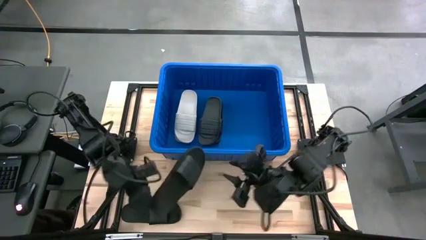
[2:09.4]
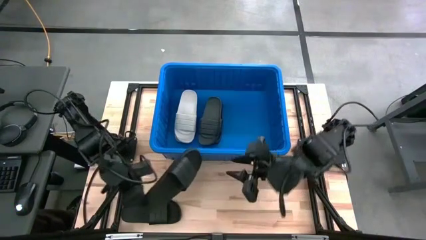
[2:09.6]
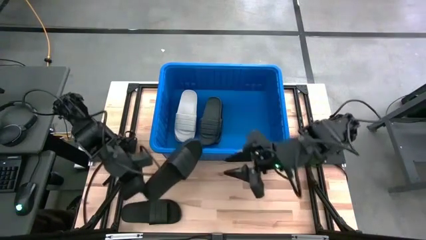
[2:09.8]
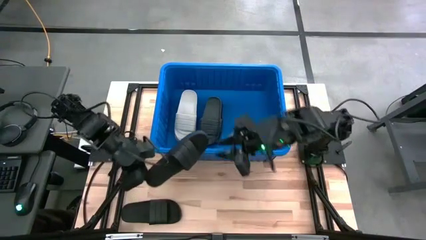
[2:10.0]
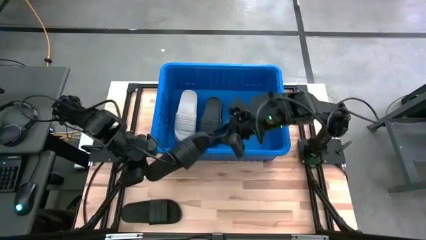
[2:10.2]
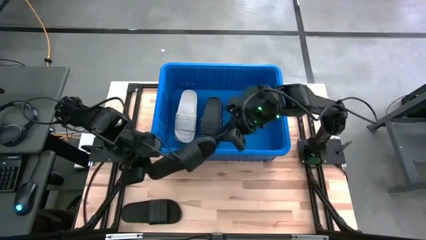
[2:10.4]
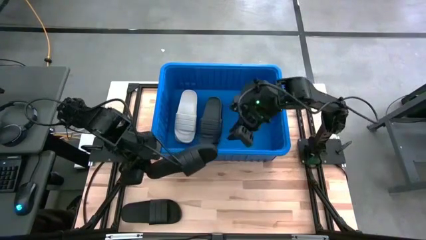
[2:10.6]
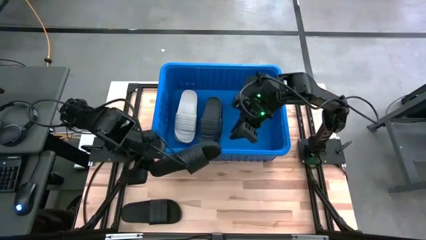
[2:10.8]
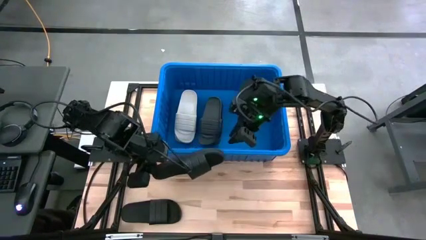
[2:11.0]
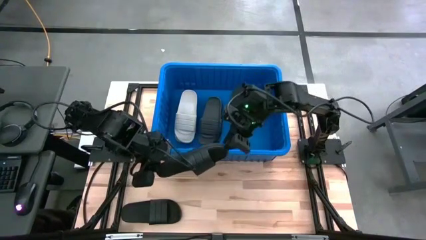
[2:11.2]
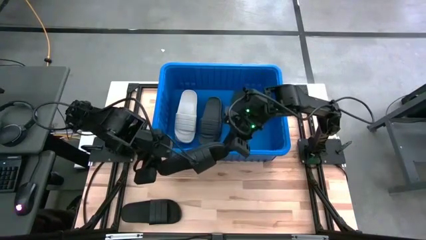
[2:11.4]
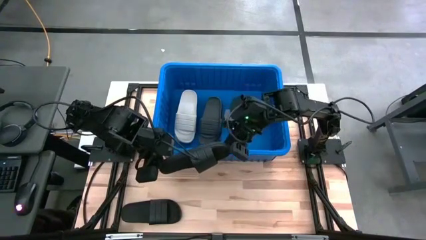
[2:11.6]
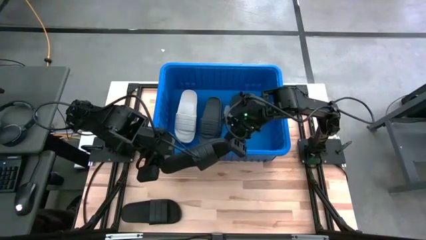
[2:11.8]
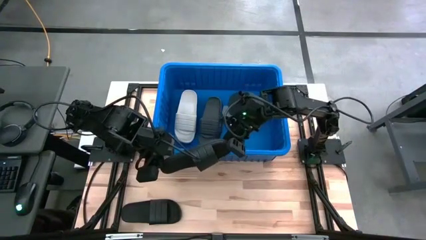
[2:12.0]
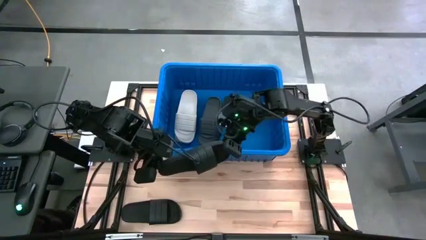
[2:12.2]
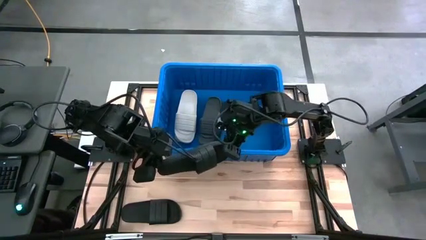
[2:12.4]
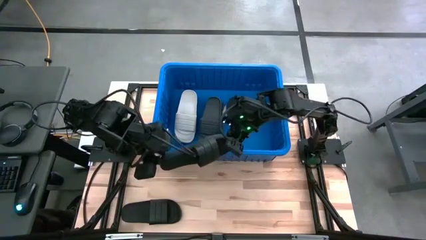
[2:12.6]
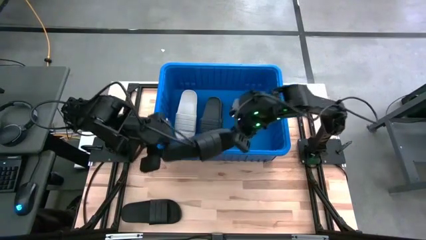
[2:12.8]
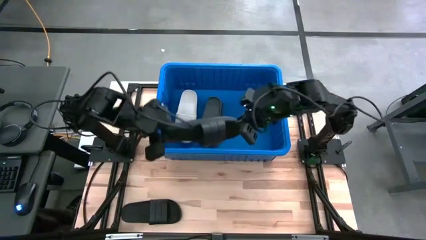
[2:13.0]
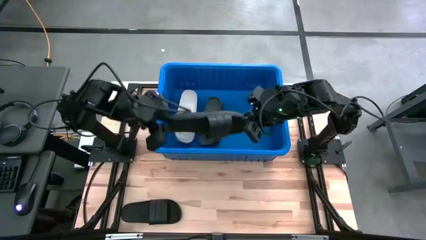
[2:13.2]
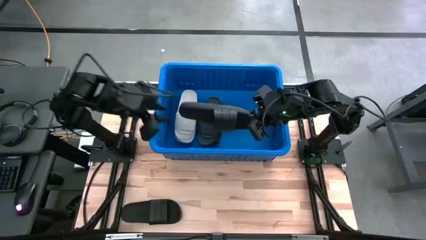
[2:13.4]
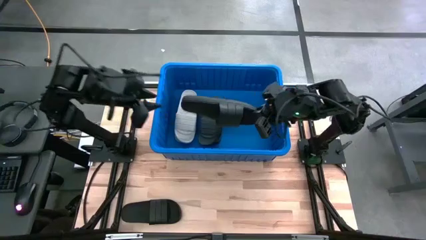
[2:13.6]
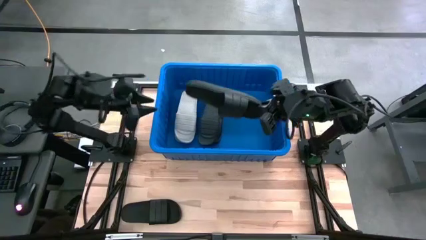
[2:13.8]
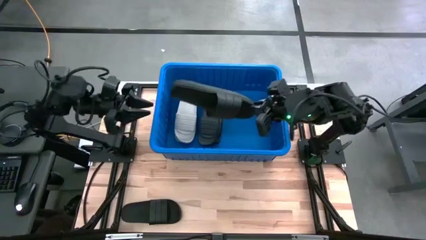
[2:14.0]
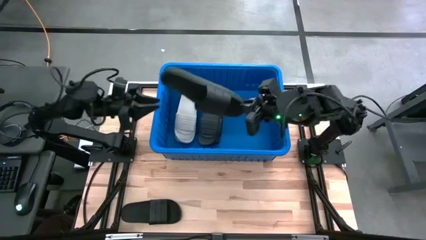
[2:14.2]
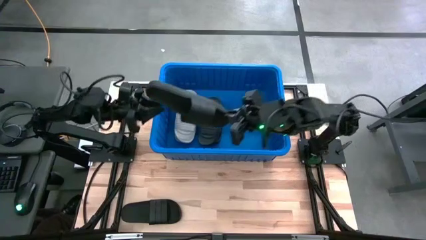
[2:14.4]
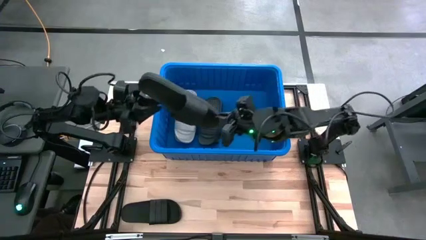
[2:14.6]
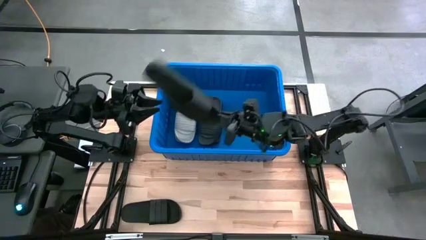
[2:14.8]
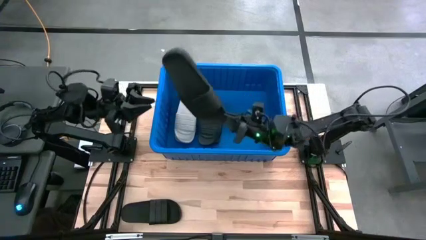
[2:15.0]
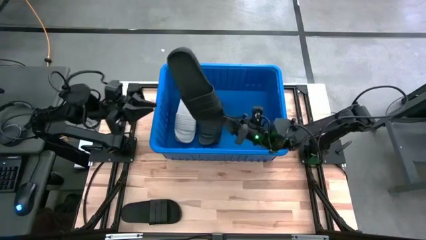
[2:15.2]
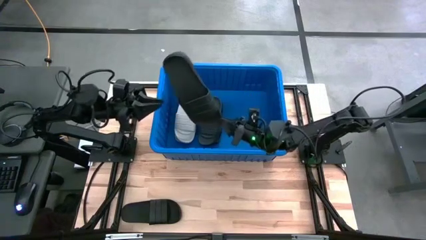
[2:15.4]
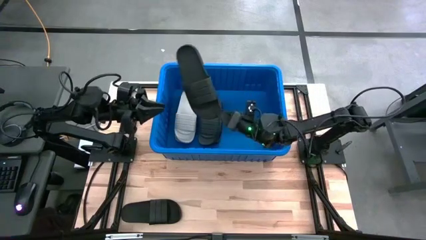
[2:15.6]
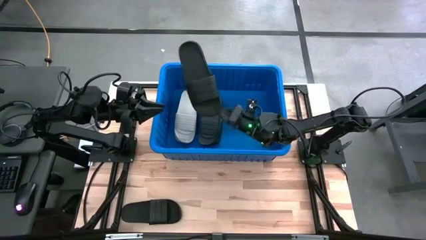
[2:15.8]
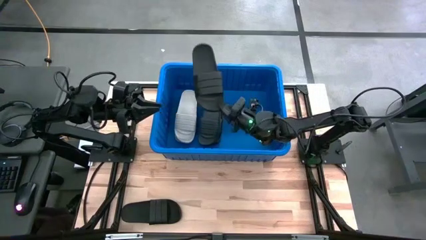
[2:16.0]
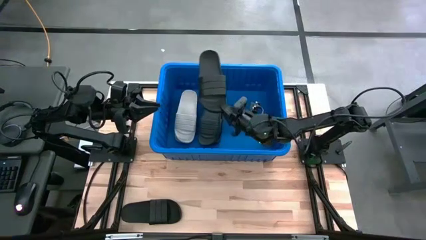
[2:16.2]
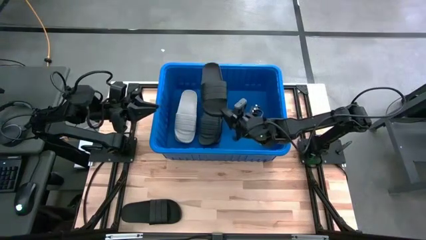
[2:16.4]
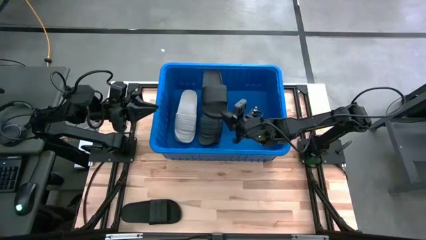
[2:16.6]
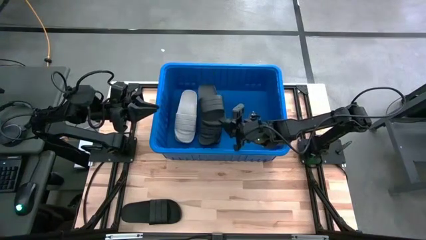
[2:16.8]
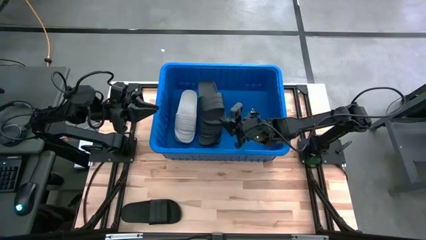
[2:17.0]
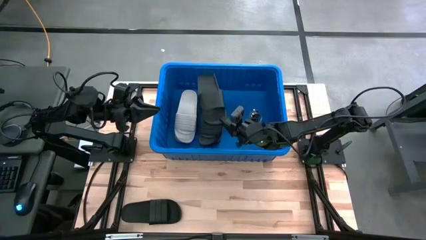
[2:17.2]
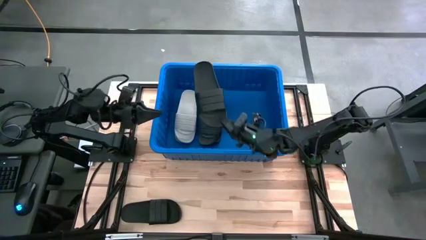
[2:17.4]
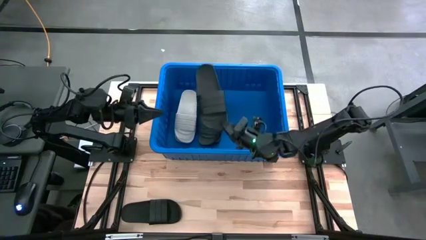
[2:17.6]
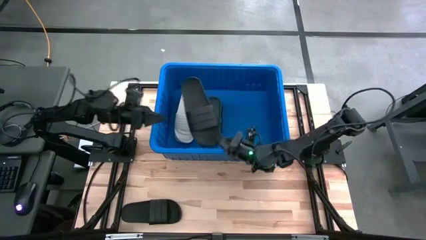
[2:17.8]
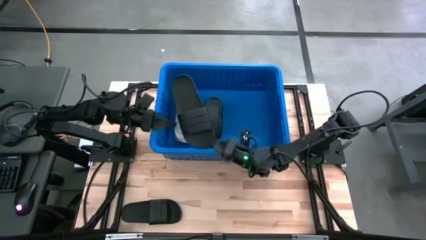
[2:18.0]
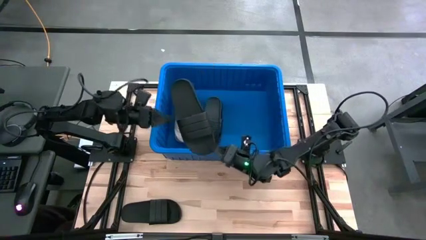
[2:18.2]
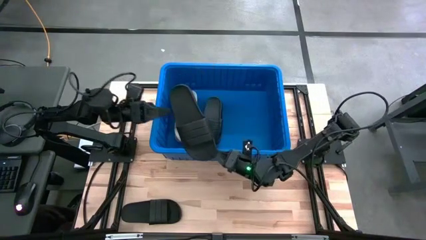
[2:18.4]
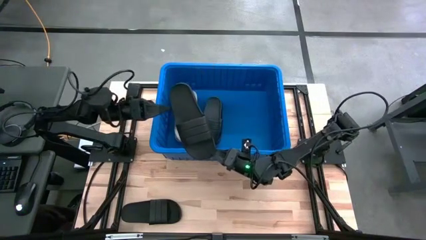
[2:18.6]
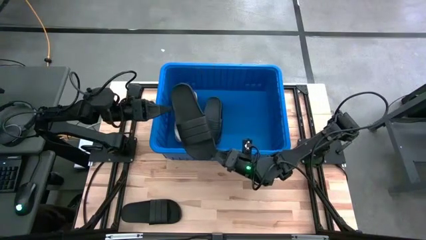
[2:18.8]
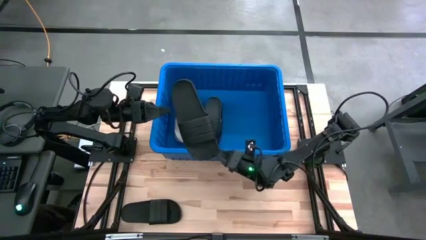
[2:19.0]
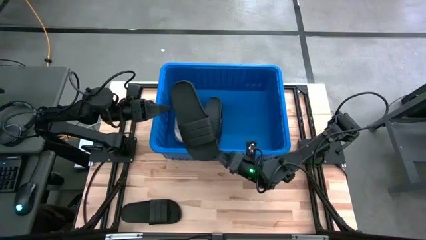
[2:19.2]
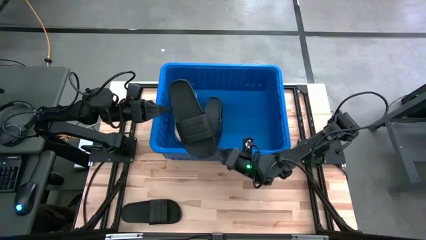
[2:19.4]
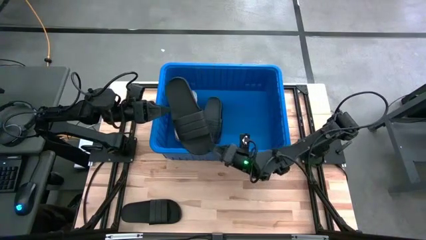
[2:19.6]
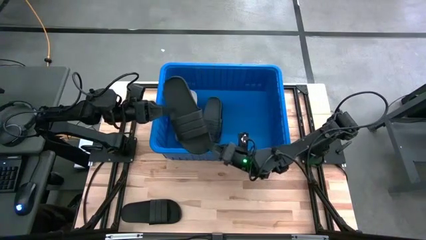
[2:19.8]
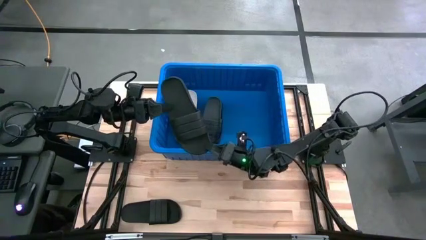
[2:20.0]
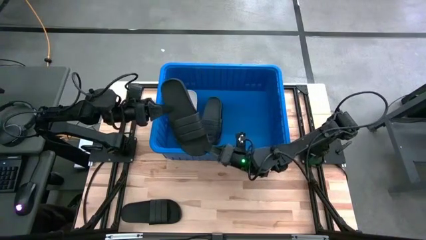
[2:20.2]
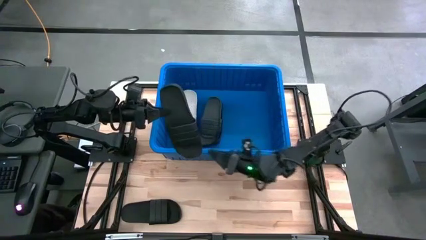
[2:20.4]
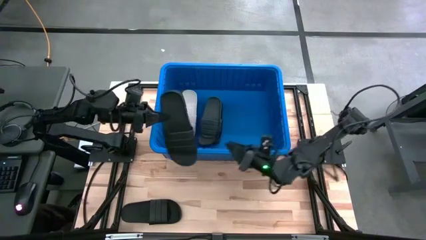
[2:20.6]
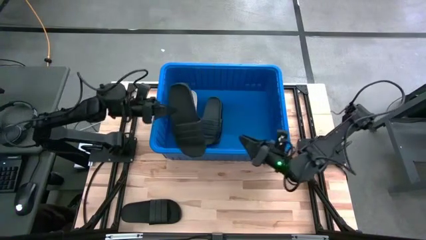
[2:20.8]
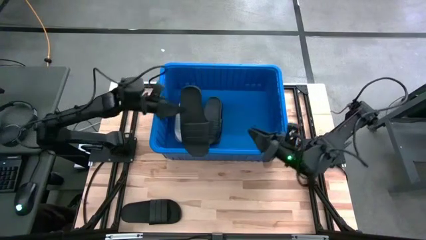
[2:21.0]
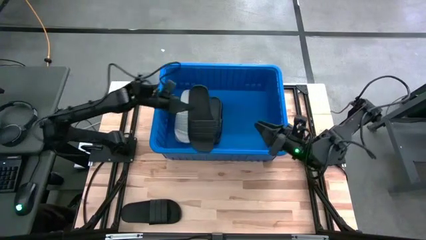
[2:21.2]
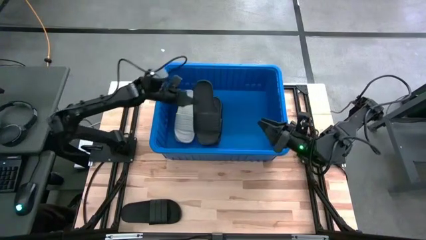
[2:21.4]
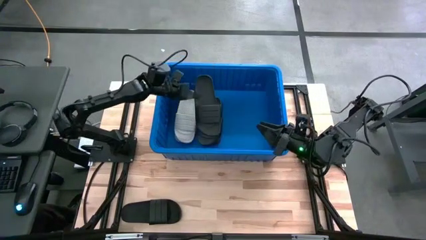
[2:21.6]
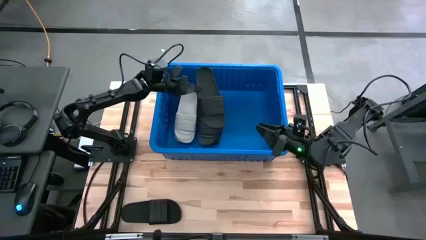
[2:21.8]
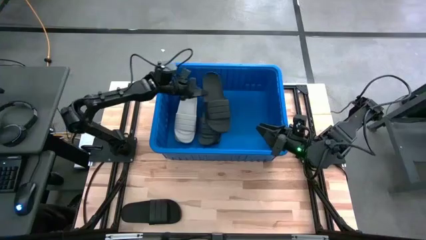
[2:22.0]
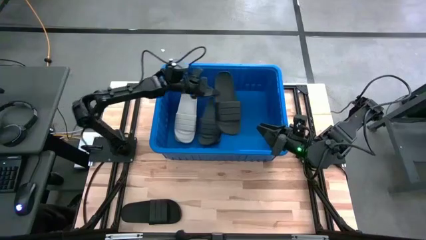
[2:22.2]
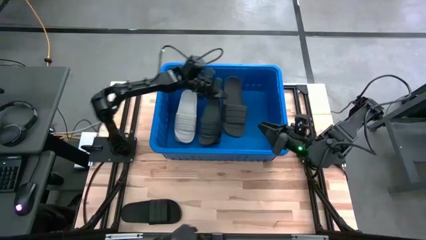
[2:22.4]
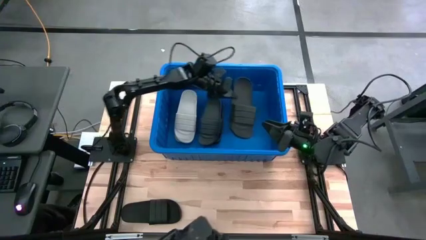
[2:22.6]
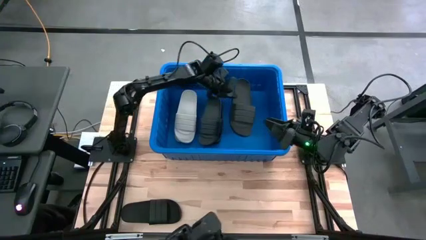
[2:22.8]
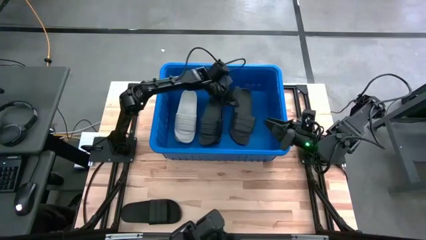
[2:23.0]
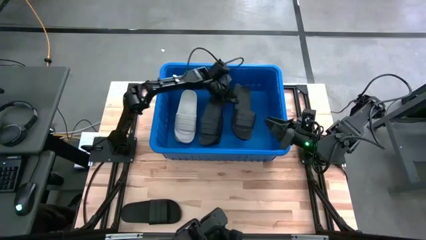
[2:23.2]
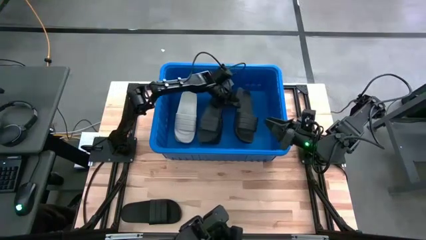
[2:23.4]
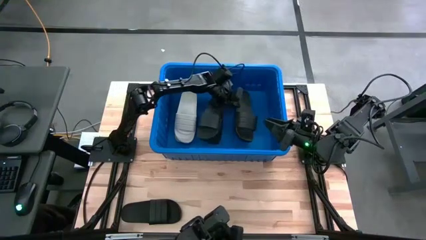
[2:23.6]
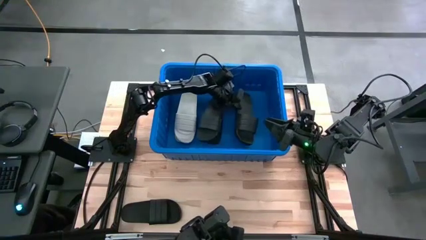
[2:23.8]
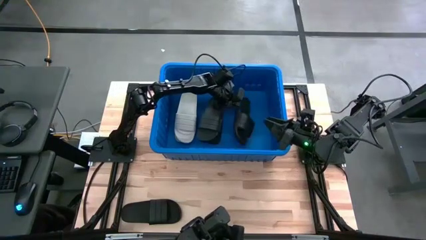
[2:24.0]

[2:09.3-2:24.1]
Task: Pick and place slides into bin
Put the black slide into the blue bin
